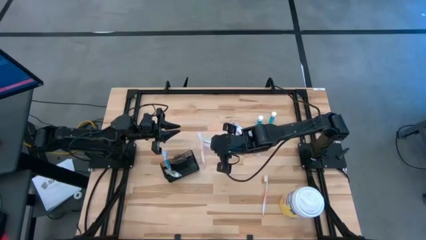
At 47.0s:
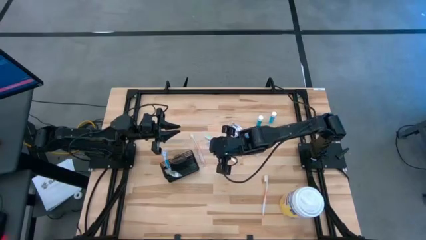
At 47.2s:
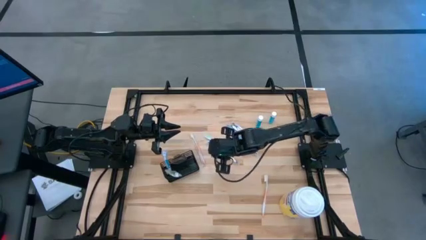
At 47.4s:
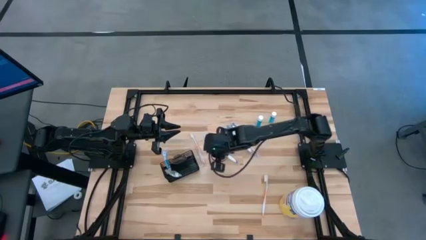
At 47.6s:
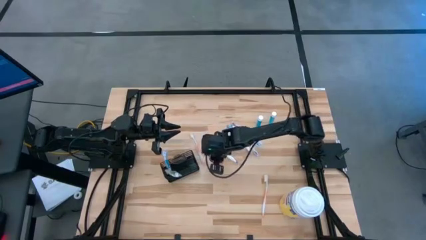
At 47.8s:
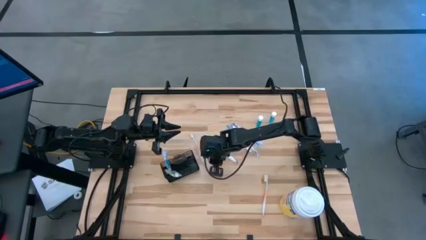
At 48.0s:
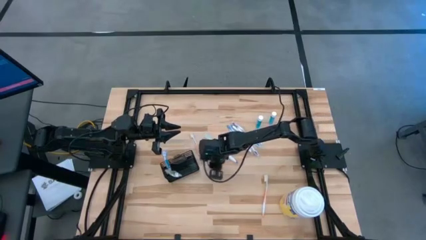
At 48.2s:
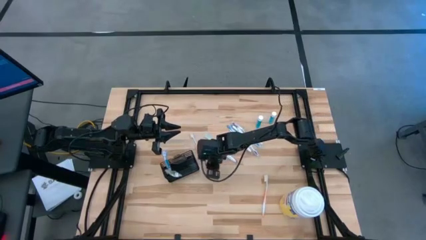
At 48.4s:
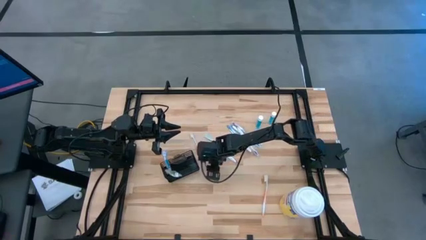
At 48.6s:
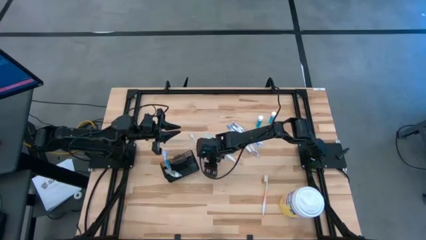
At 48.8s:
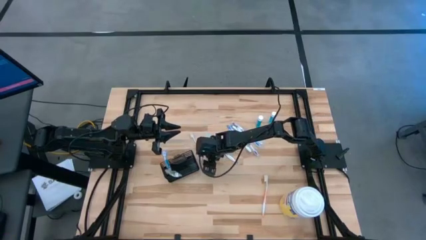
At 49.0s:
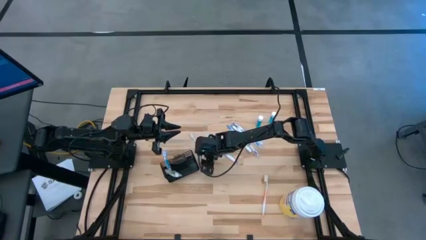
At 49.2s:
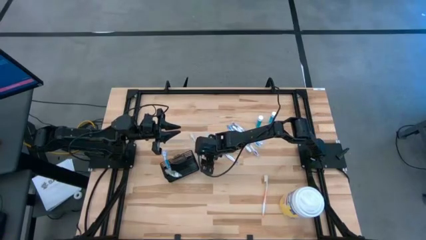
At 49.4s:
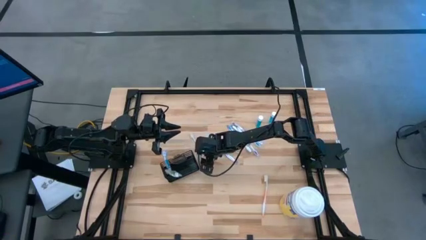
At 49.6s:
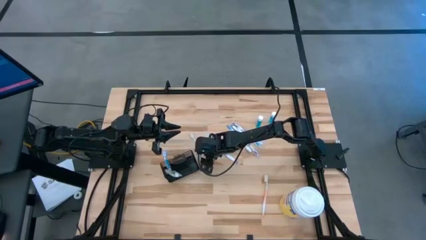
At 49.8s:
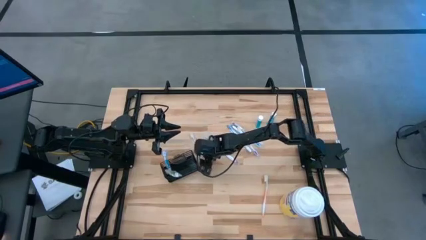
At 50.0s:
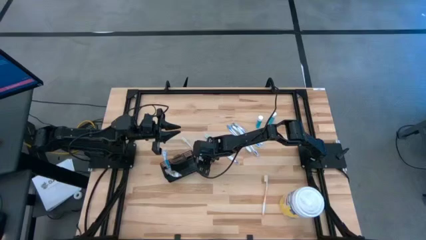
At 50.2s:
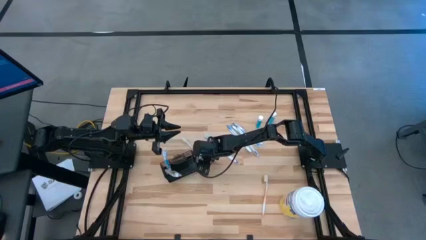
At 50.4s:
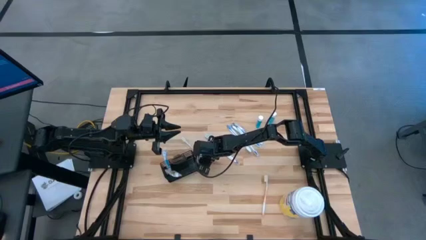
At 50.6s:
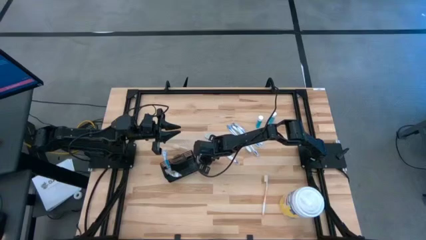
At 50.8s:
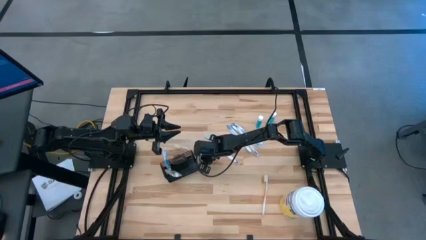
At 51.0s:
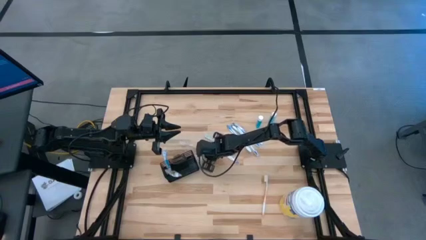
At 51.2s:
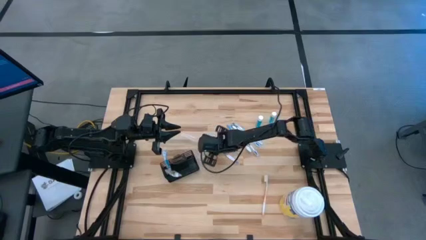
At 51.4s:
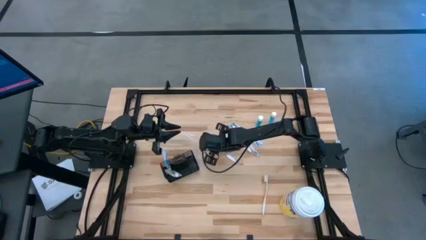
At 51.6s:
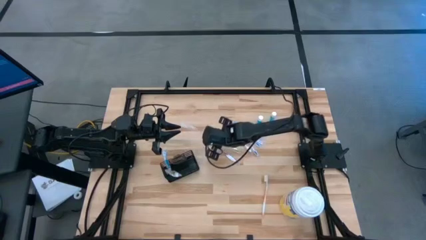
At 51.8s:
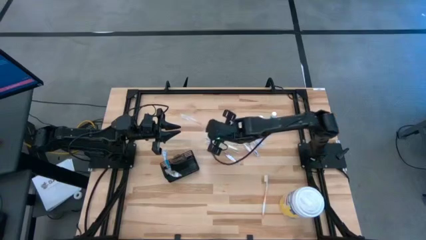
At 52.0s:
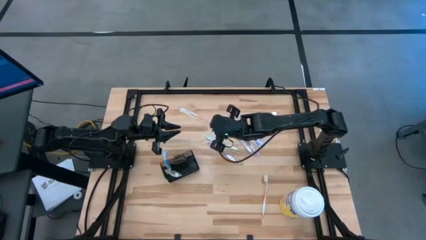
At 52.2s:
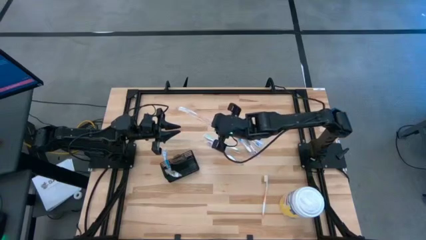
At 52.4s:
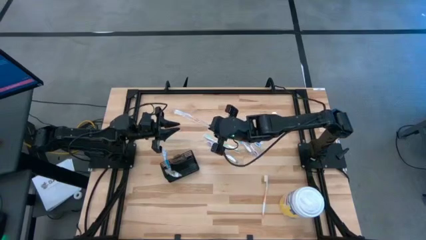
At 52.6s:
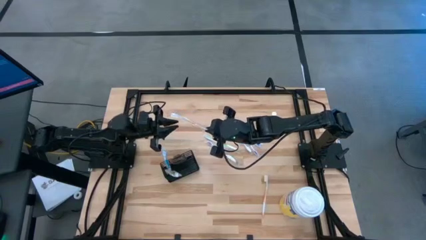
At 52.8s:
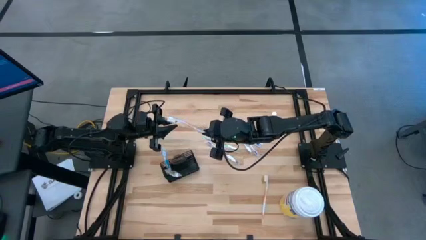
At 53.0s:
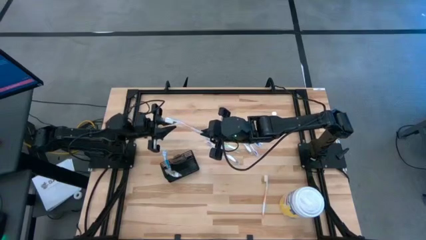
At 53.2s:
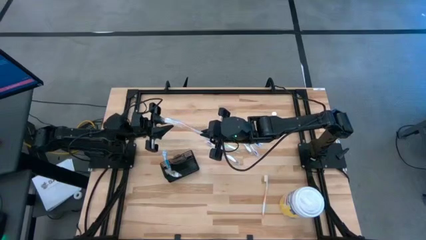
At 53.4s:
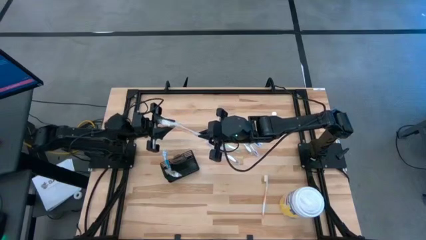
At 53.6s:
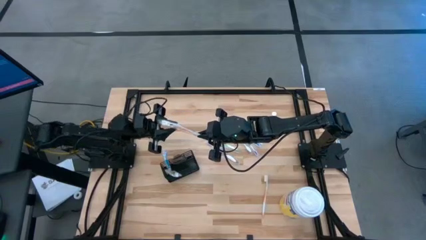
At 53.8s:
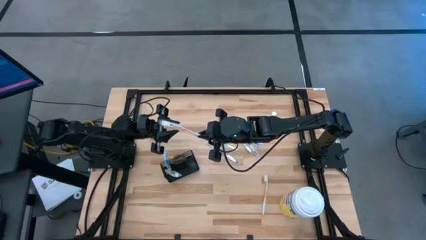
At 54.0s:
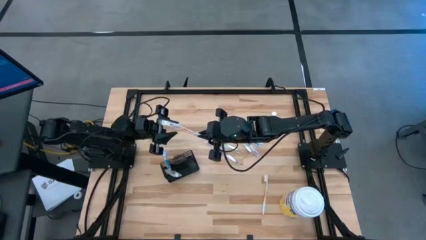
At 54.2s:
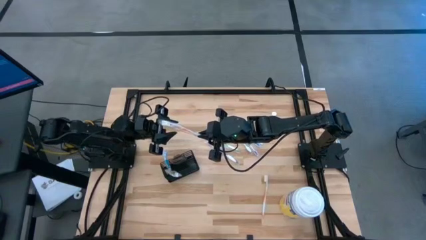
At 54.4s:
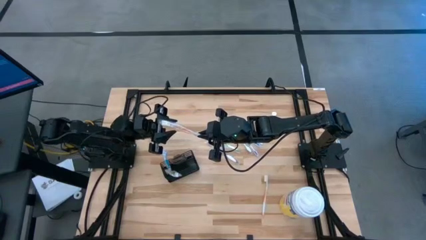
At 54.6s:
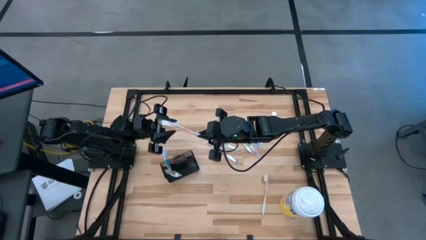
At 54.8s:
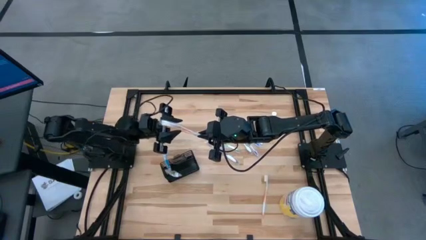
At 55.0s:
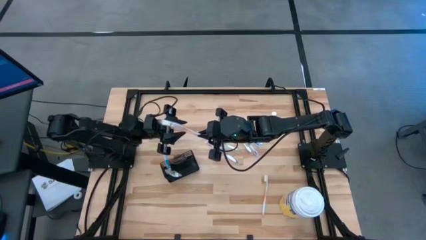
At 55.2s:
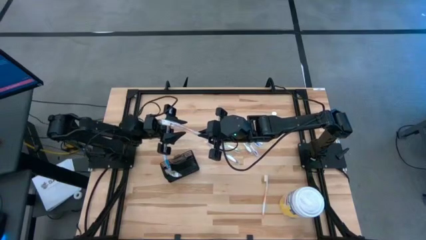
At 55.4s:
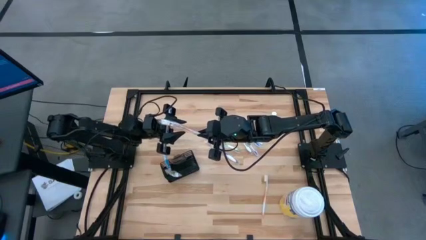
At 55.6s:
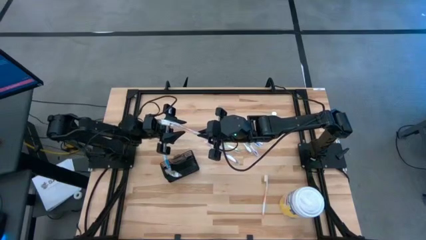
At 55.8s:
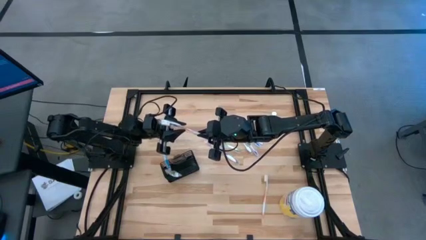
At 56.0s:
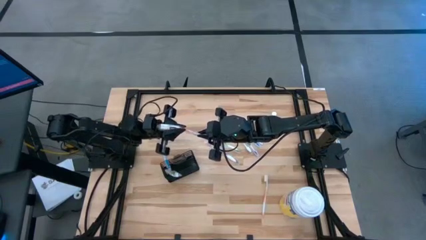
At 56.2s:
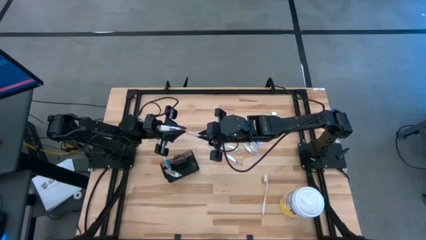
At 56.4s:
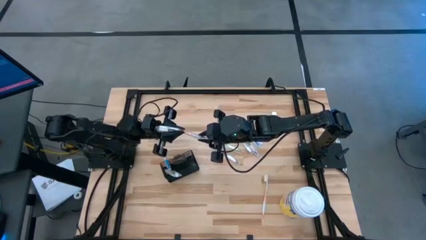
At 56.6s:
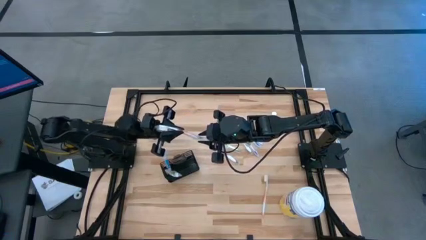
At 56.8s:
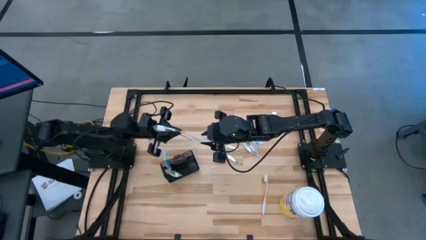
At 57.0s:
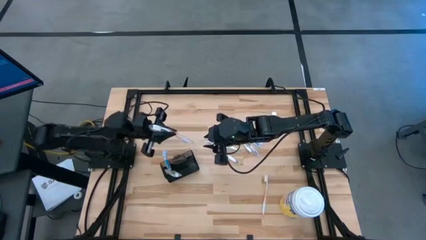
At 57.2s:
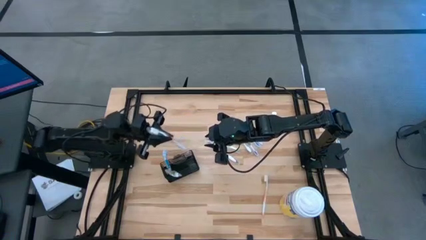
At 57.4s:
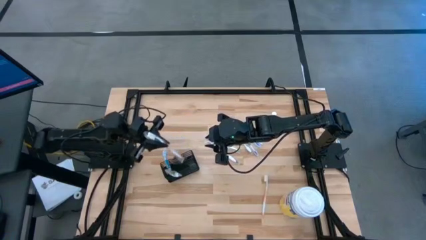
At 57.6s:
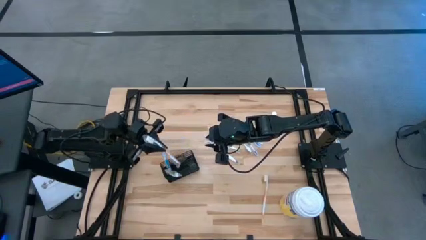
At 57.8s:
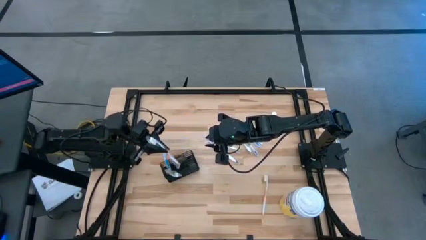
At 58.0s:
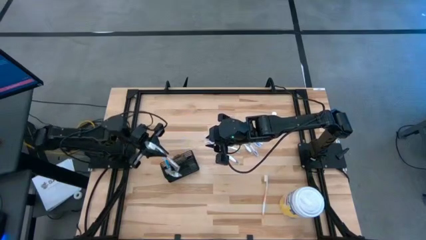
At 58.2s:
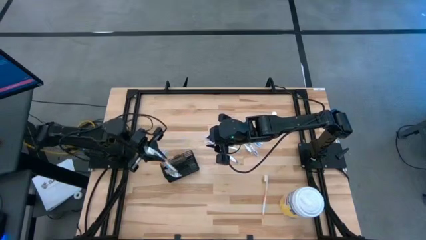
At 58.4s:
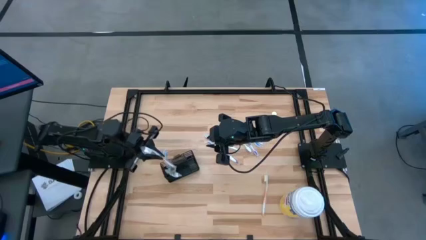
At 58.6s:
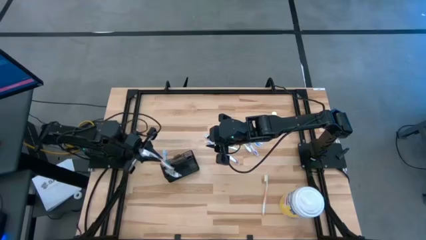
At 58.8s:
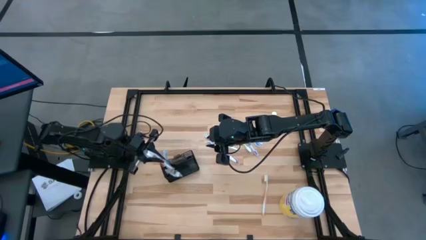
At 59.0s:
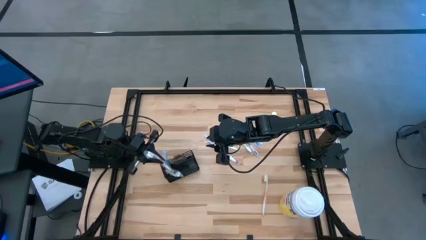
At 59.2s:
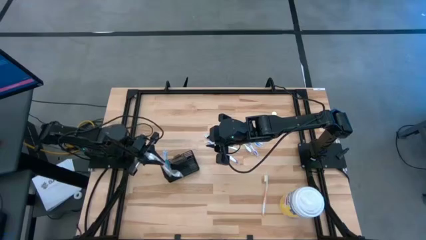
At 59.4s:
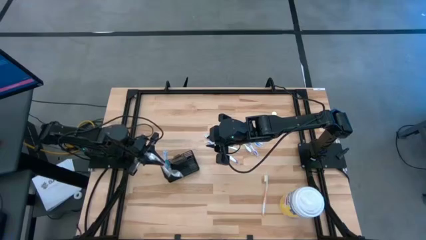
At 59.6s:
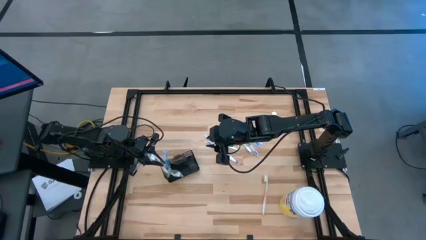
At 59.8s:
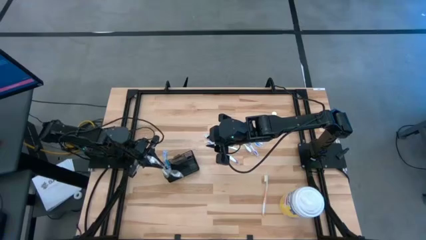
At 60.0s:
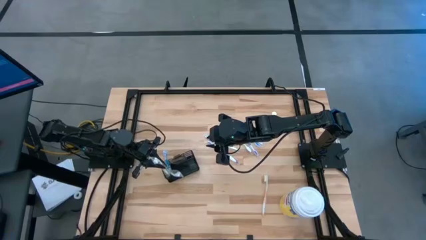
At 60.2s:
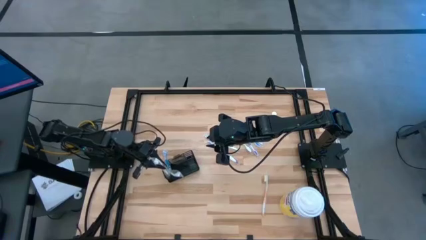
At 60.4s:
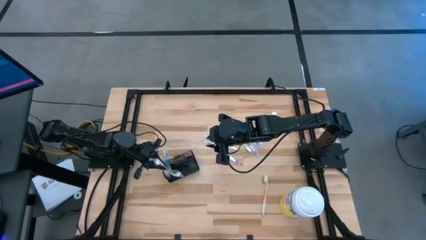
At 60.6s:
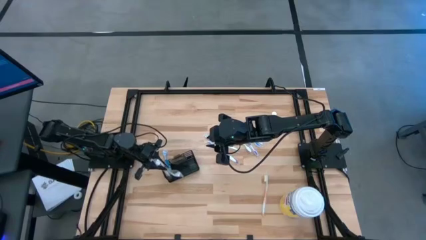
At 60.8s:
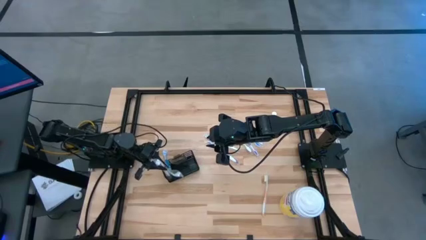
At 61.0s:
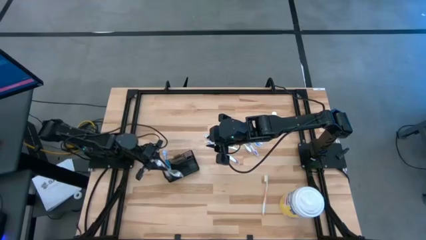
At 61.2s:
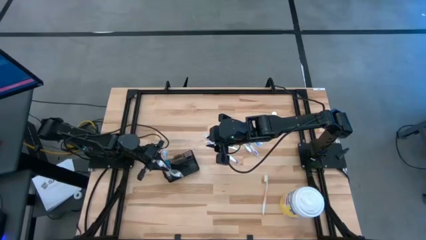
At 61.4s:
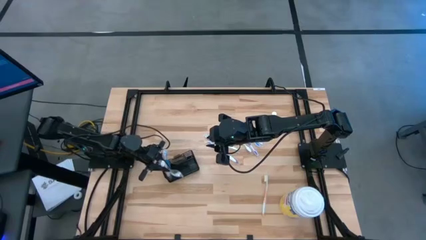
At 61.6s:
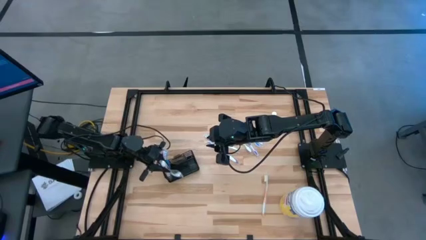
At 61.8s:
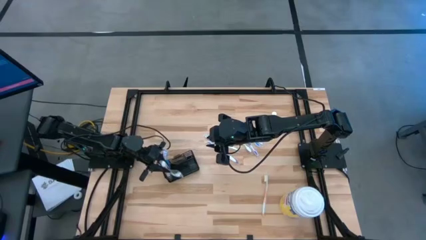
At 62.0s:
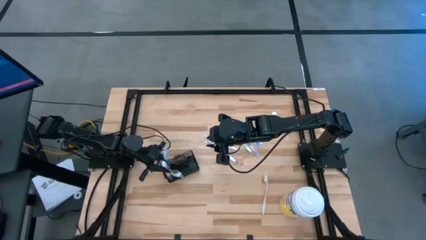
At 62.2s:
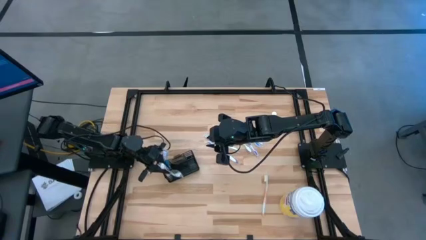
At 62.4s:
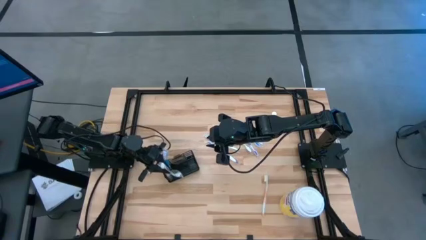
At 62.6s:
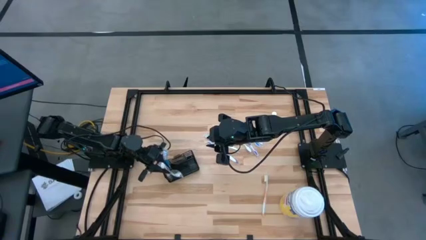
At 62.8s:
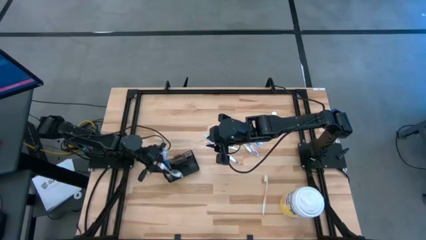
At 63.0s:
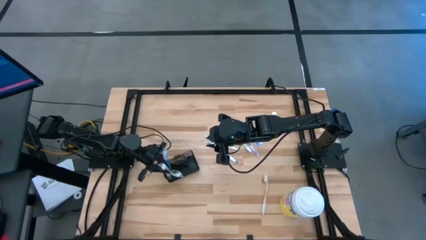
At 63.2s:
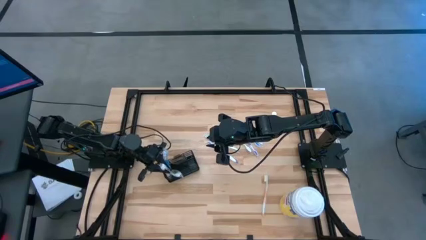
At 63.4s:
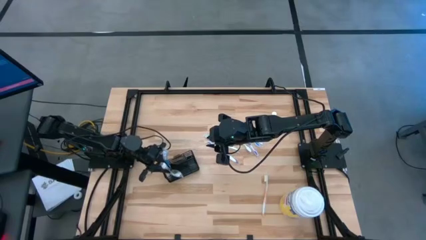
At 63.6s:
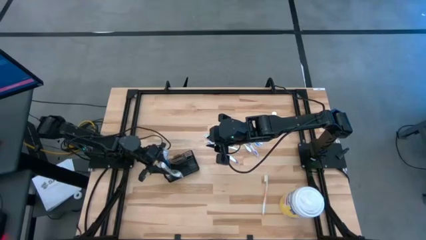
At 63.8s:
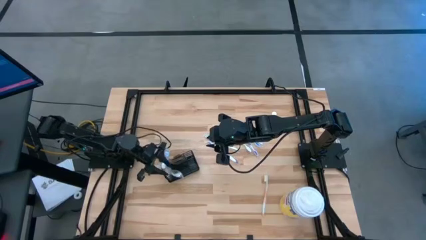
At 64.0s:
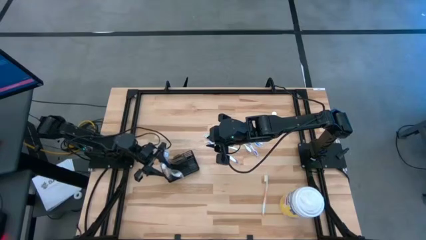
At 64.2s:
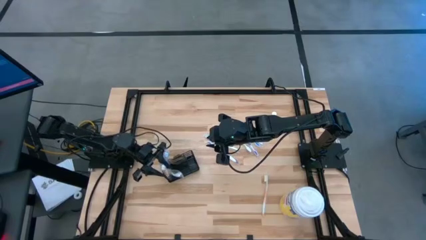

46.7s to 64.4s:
Task: Pick & Place toothbrushing station
Put the left orange toothbrush into the bottom left section of the mesh organizer

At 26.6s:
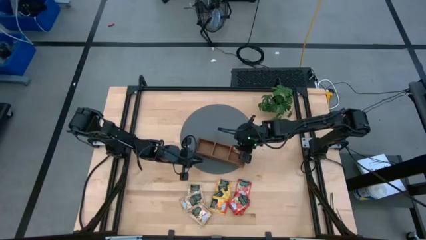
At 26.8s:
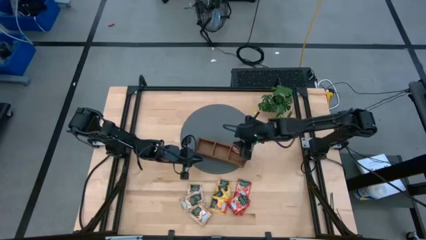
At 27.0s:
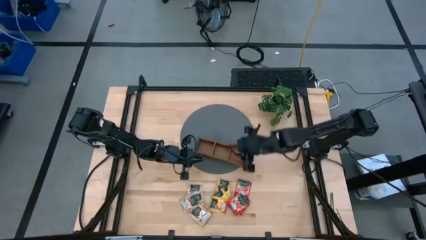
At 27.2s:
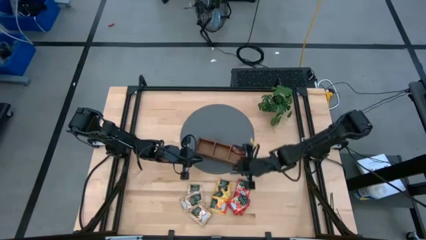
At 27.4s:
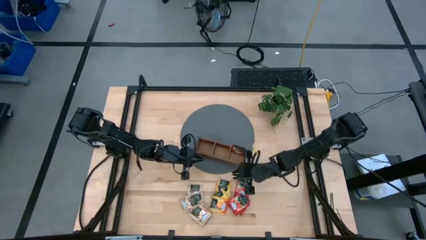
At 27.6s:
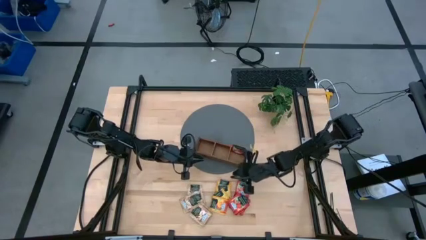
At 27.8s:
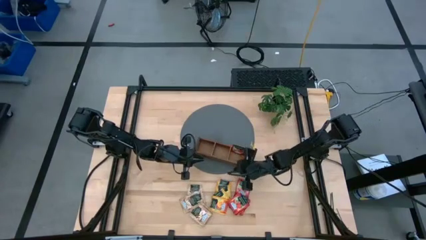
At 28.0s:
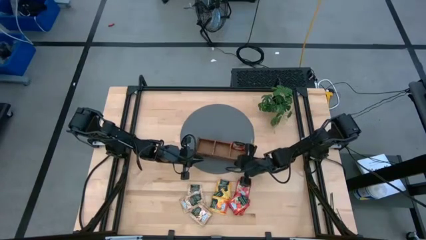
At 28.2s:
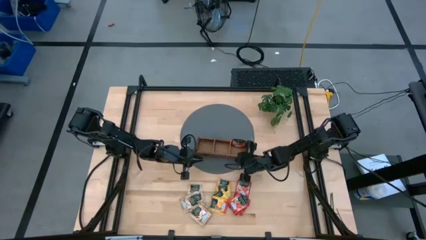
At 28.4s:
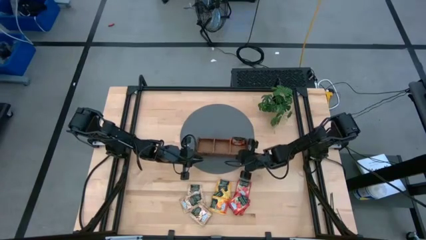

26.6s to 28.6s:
Task: Pick & Place Tea
Adjust the wooden organizer
